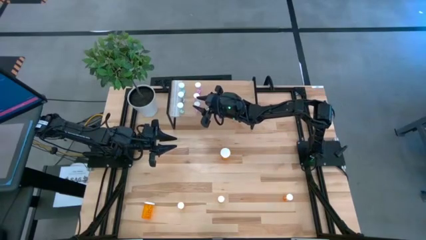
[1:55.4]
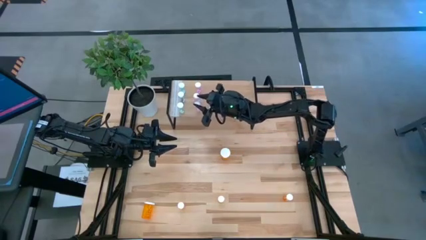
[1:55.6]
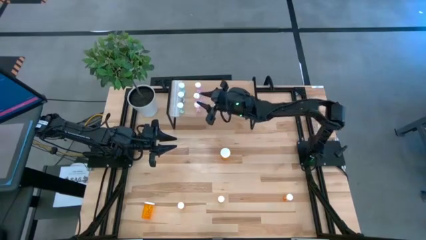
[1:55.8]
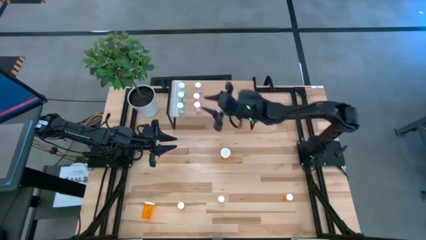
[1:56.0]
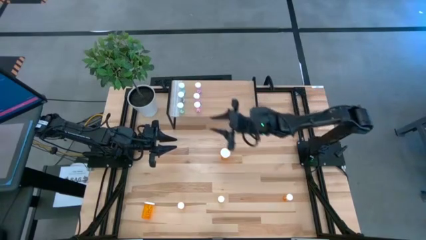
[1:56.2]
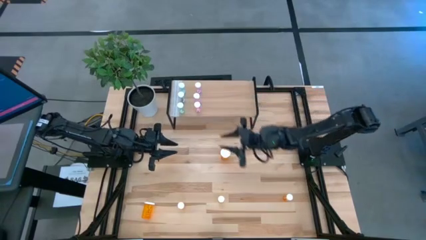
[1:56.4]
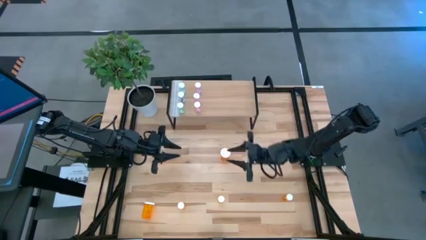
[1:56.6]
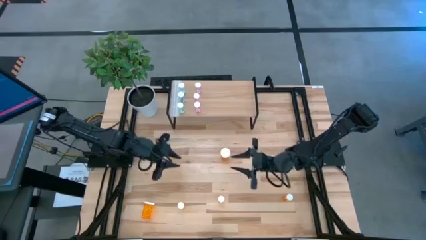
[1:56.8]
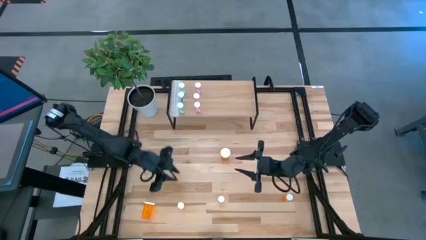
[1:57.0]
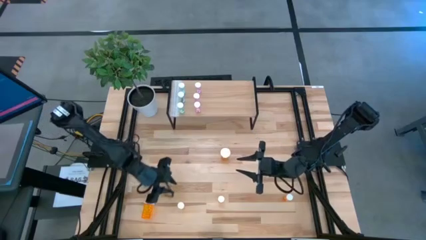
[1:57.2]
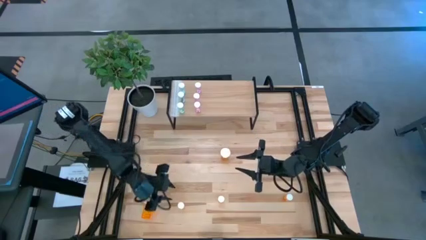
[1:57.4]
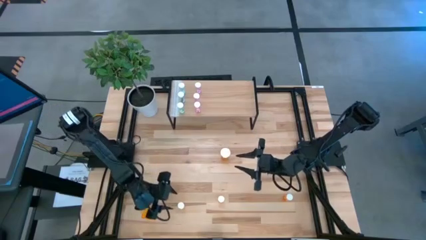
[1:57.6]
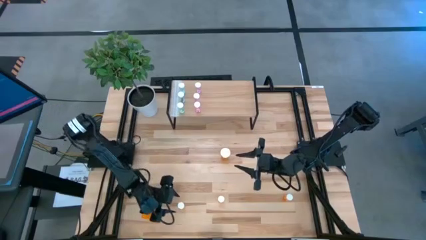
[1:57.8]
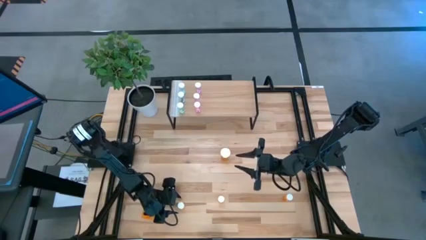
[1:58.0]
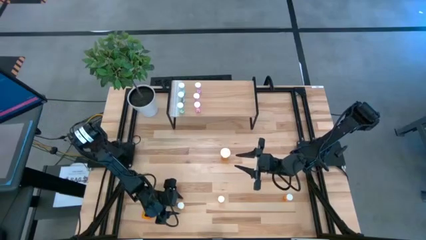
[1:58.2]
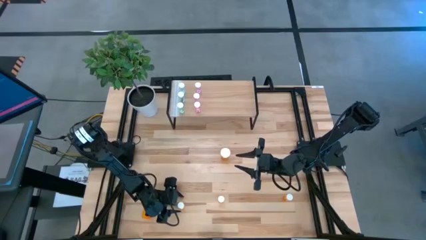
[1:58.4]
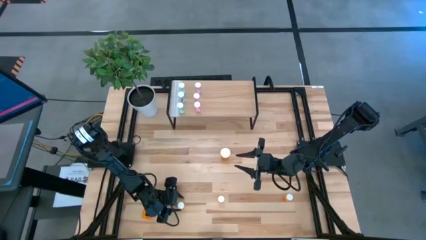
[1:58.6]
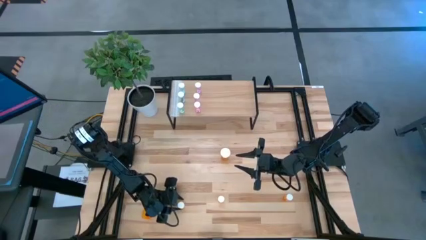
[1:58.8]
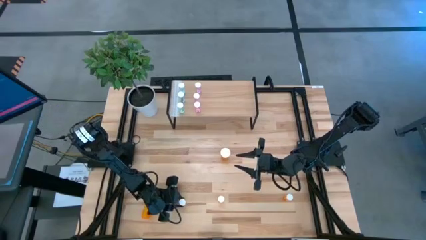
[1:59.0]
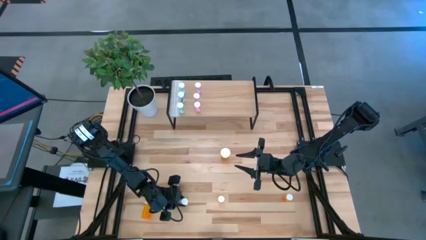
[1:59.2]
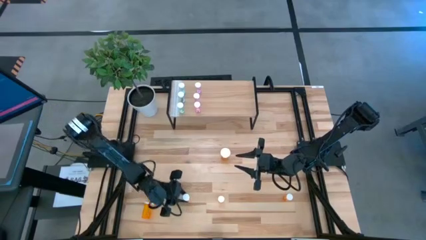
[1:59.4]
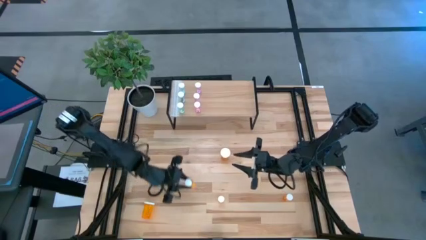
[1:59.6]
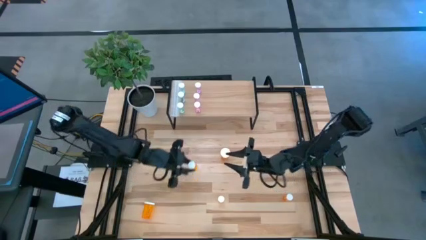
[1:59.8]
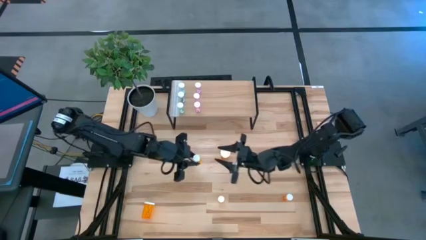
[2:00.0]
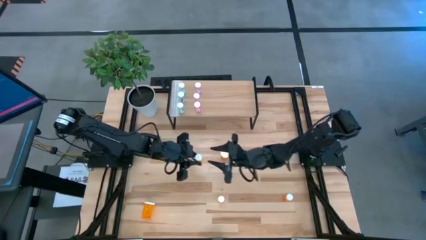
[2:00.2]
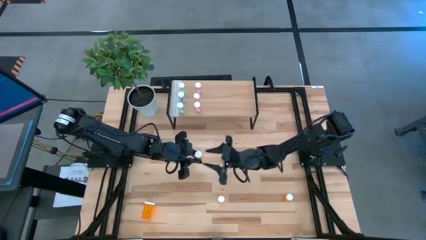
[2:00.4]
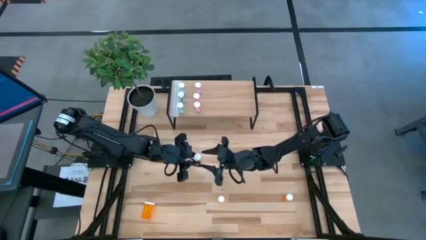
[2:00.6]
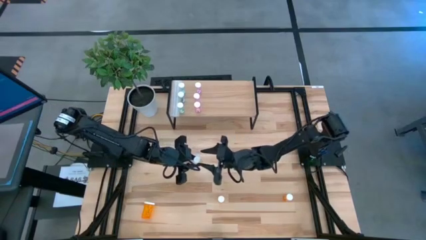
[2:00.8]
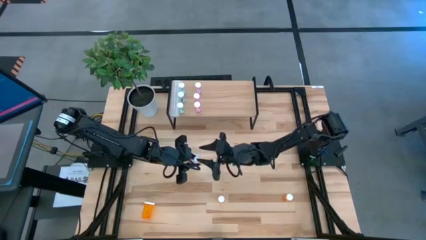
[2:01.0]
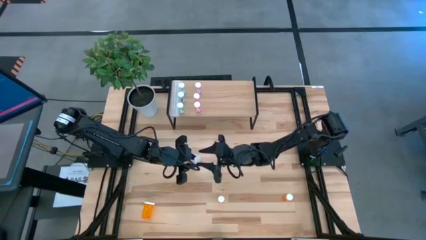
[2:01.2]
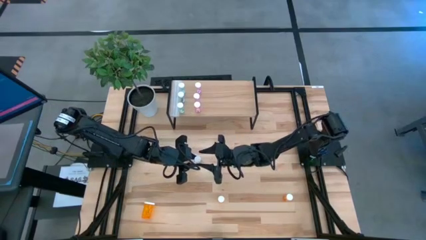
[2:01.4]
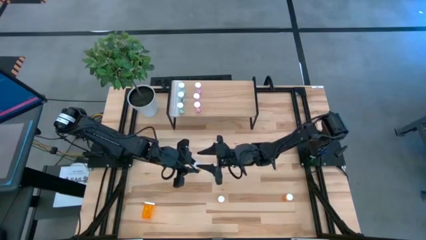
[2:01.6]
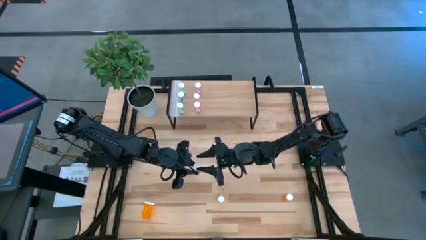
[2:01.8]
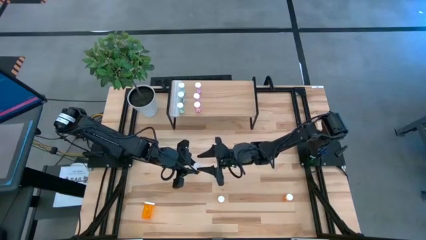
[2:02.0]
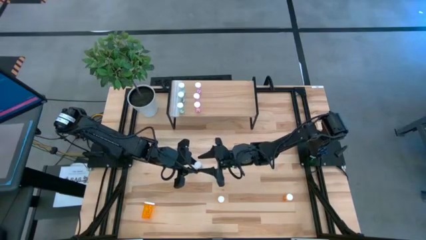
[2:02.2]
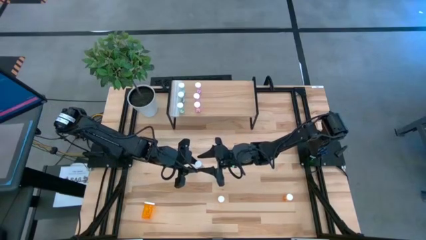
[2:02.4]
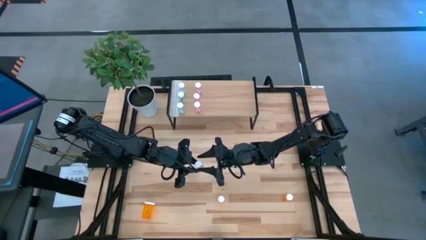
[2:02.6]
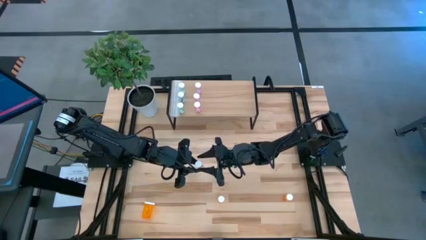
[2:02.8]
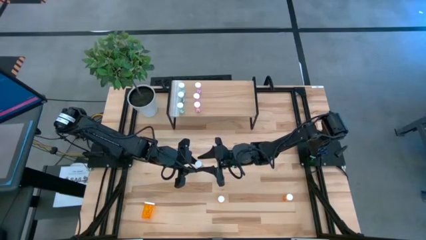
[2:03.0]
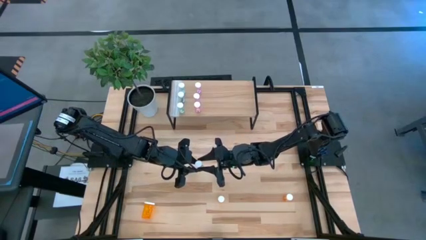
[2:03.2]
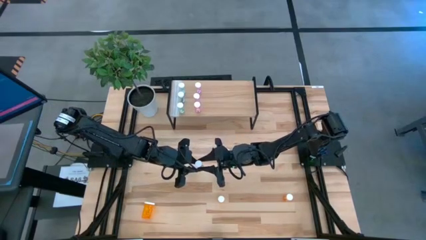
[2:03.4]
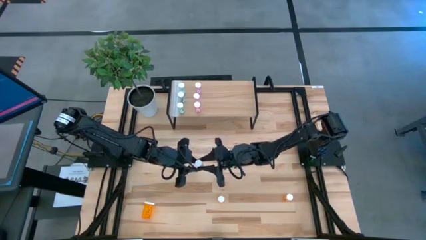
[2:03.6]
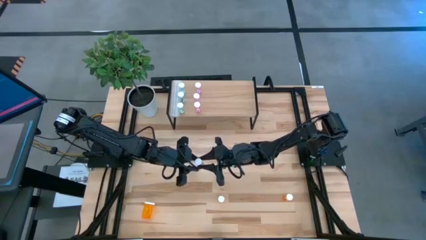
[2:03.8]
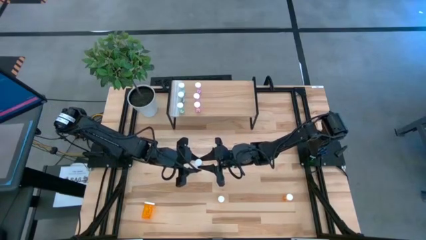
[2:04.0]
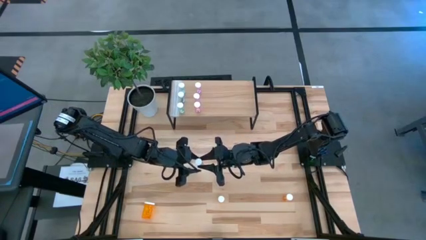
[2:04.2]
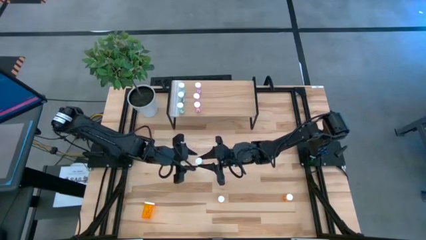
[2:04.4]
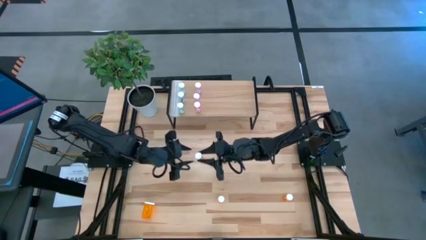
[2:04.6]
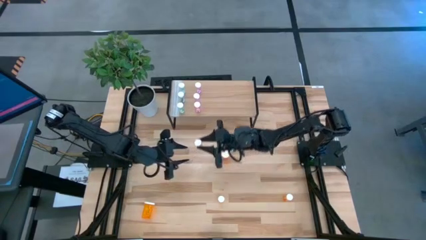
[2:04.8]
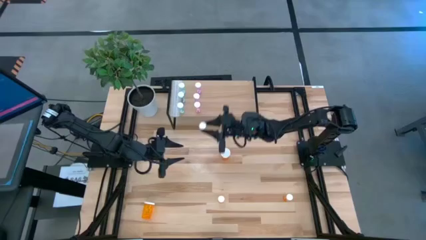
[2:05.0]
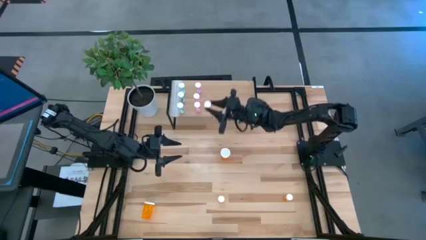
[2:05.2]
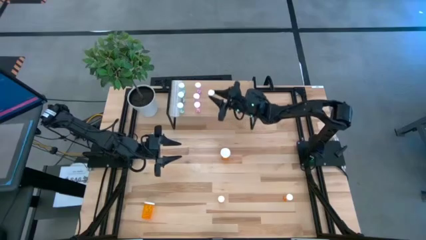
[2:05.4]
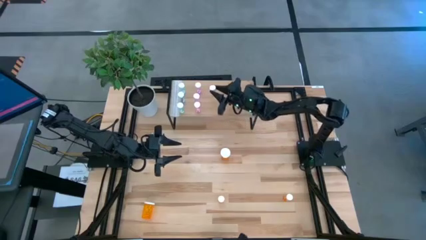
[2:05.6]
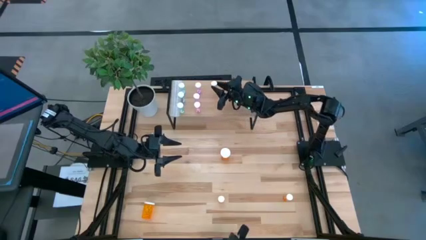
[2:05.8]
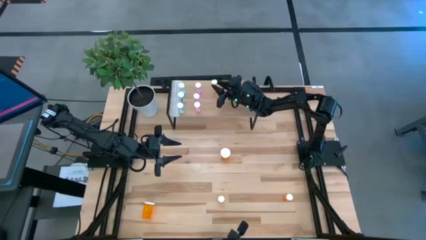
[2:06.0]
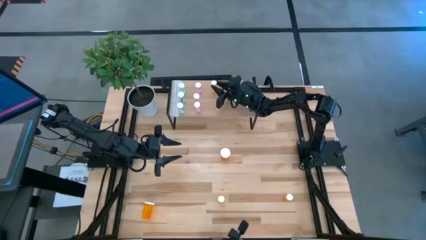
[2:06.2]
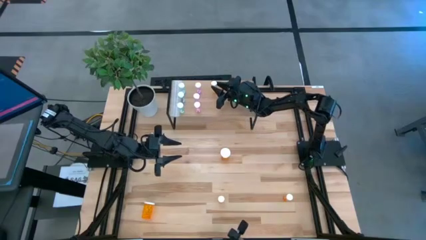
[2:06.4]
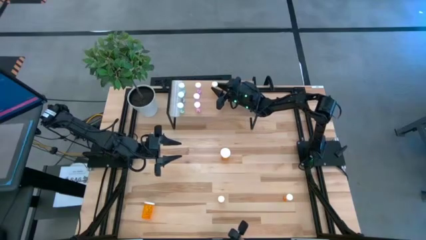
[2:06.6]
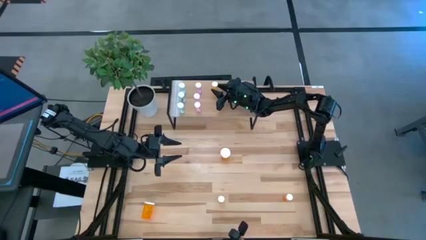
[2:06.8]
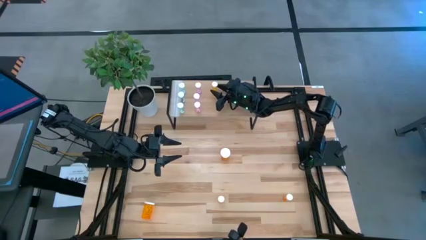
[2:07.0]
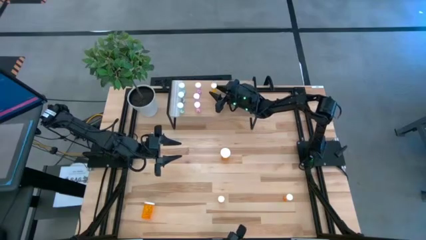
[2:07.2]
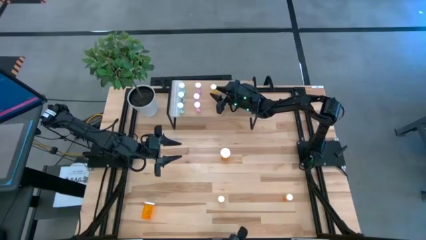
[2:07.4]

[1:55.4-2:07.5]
Task: Pick and place medicine bottles onto shelf by color
Put the left small orange pill bottle on the shelf
